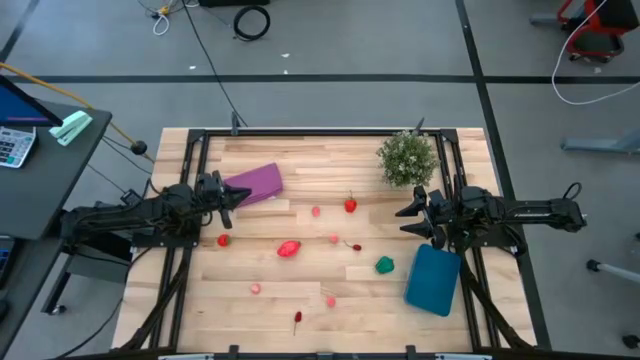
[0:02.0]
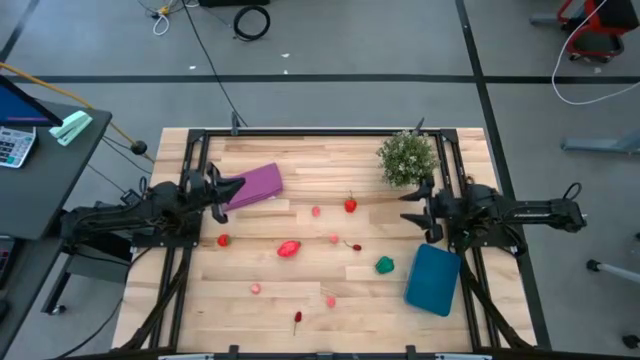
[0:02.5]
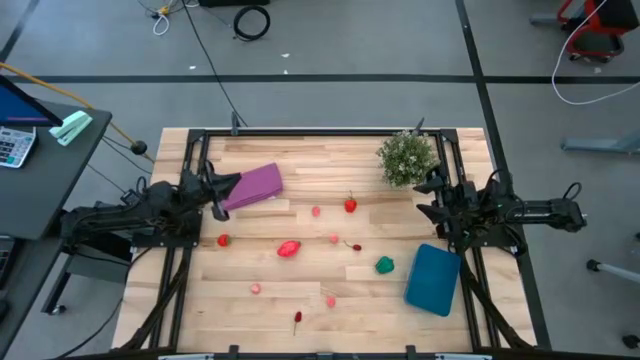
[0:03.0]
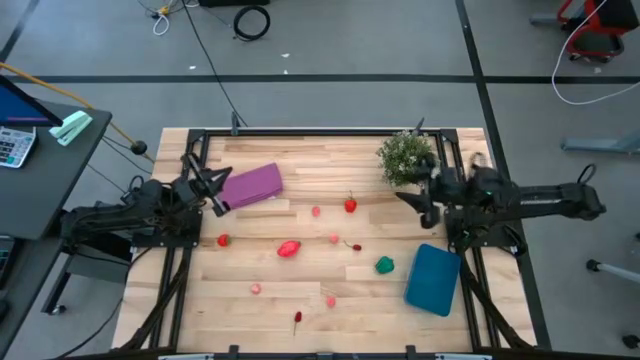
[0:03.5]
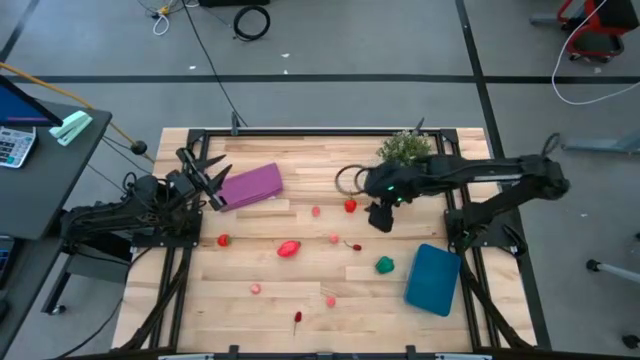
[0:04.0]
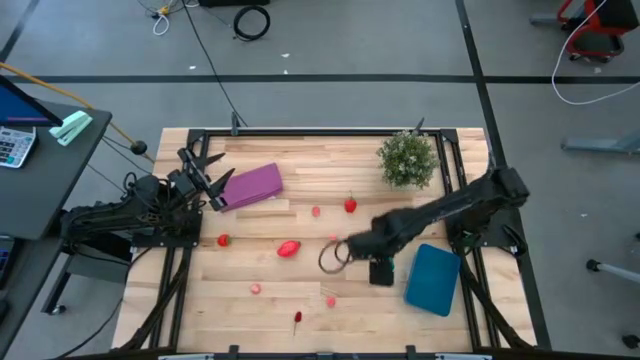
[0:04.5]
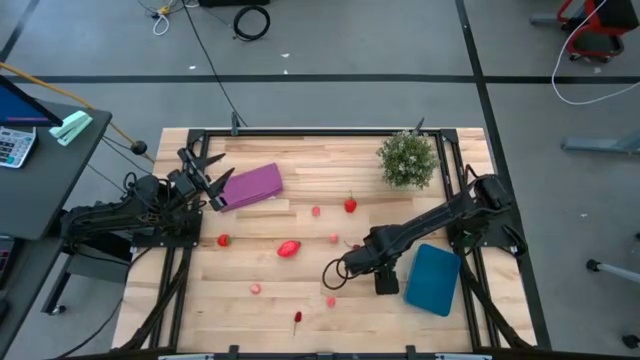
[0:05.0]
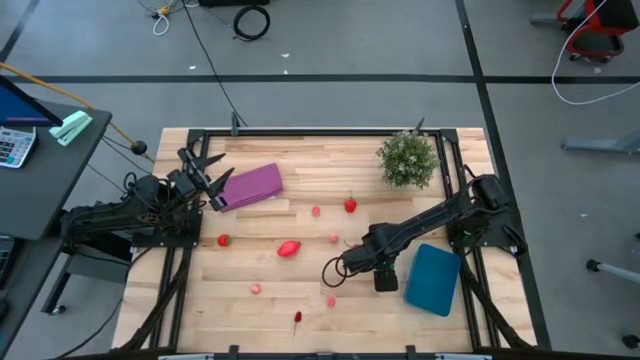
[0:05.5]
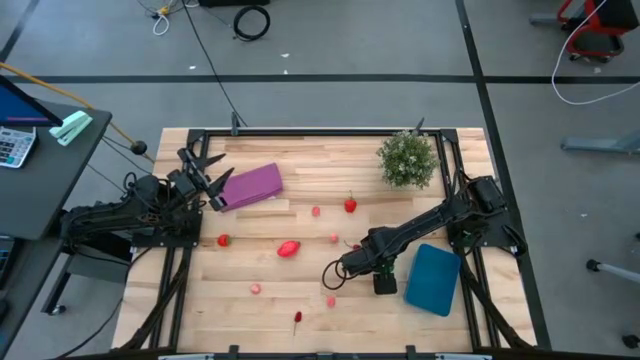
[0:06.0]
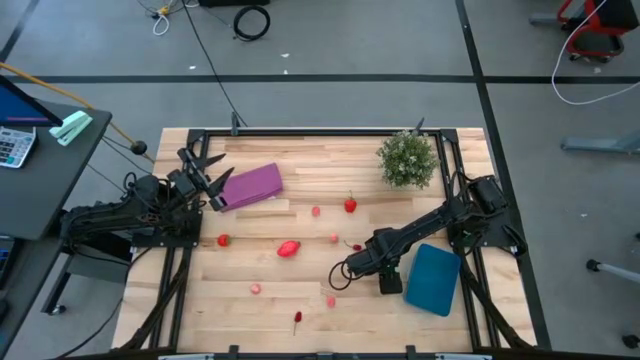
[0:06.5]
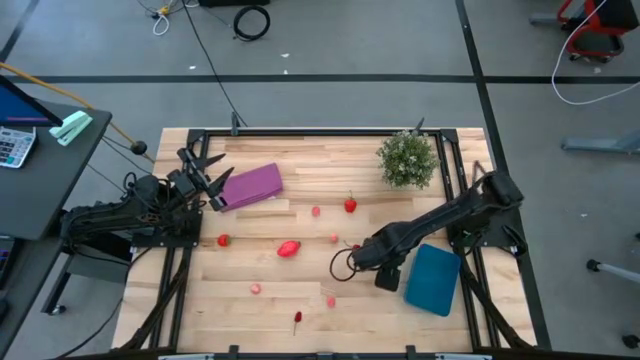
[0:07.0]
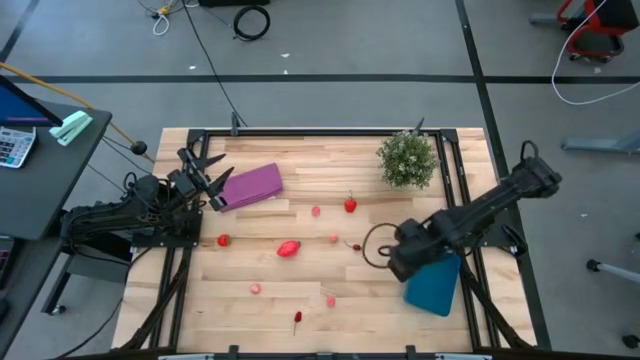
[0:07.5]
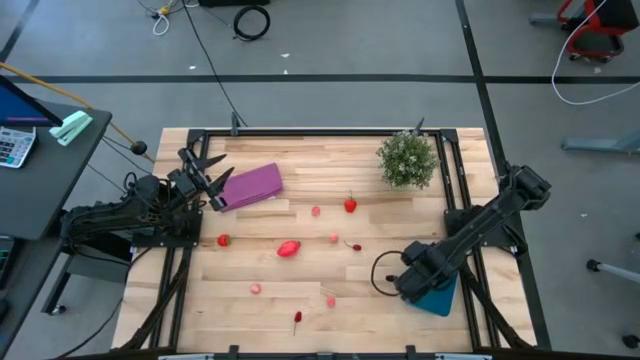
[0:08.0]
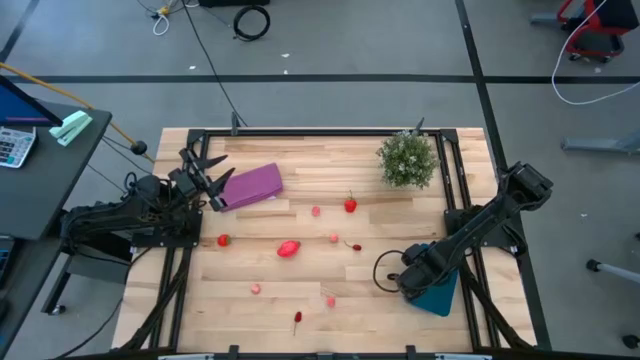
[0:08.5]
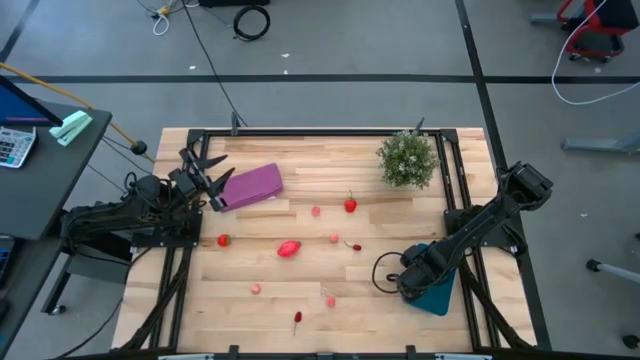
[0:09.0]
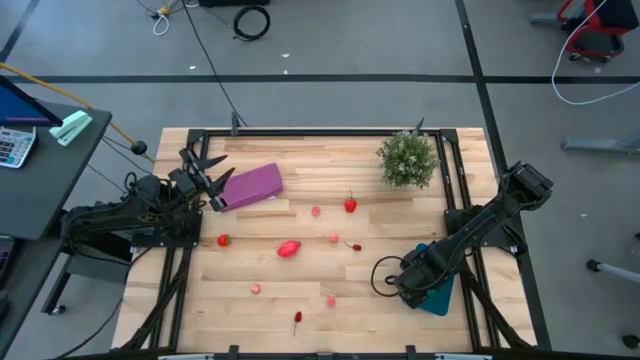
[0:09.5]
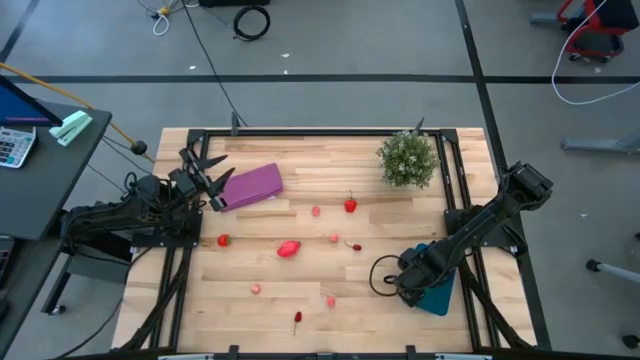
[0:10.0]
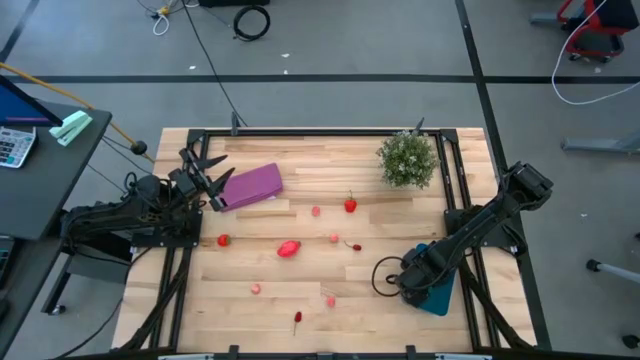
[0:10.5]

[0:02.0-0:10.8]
Task: Pick and placing Produce into tupperware
Put the green bell pepper into the blue bin

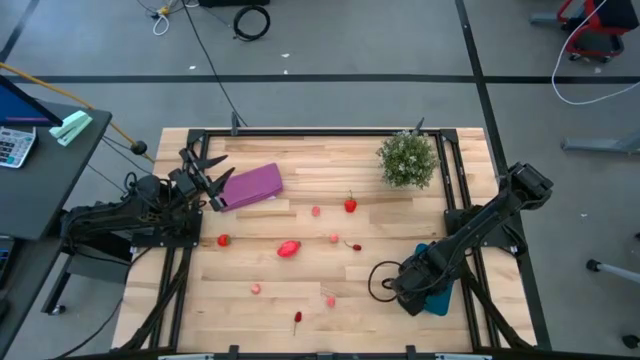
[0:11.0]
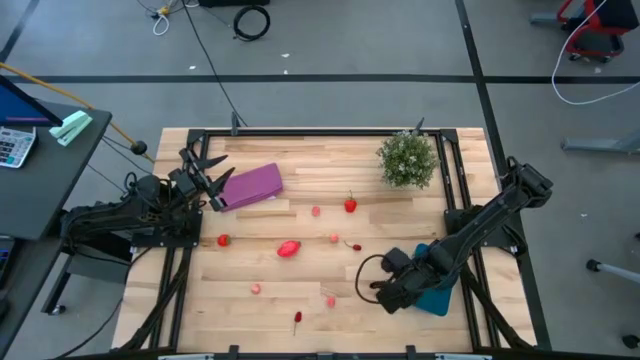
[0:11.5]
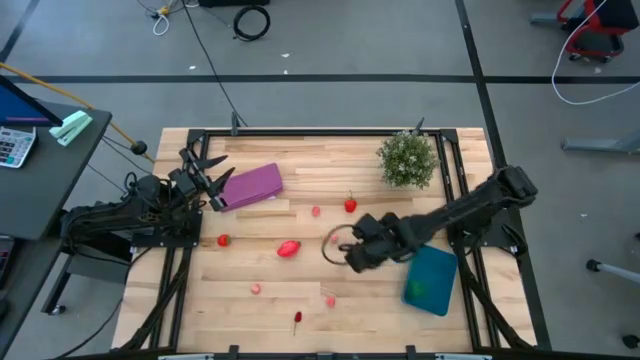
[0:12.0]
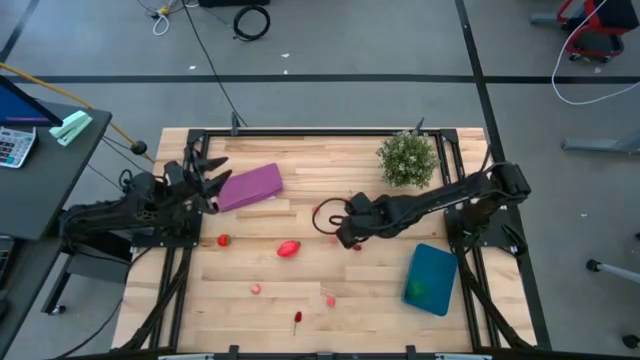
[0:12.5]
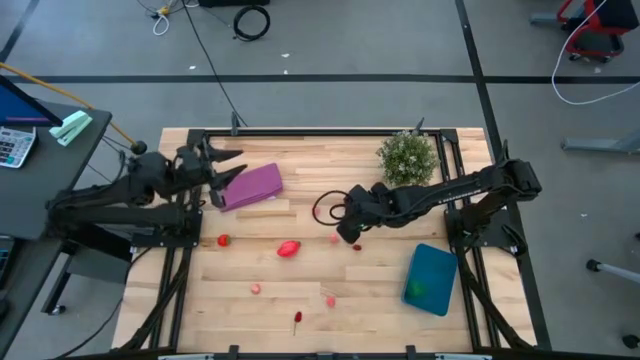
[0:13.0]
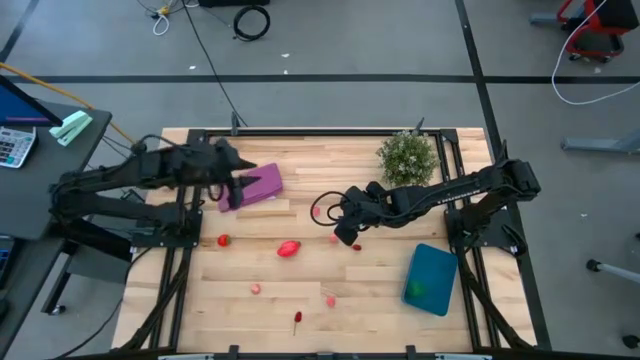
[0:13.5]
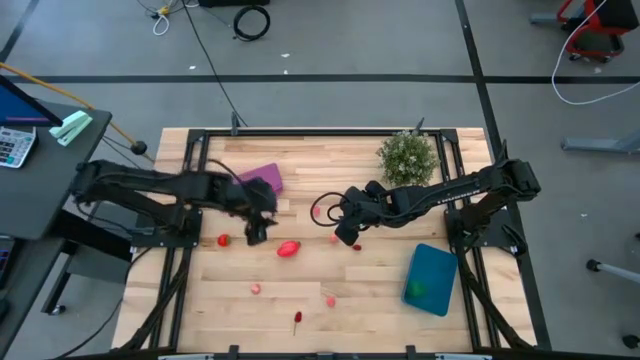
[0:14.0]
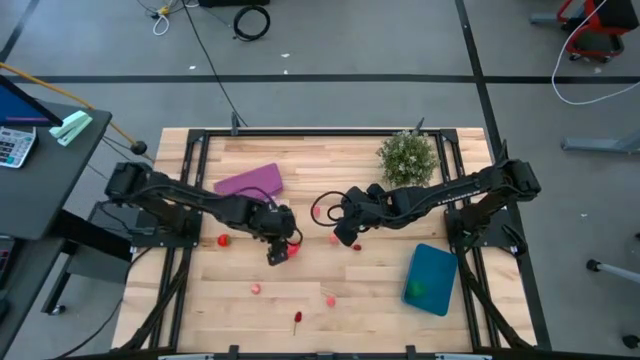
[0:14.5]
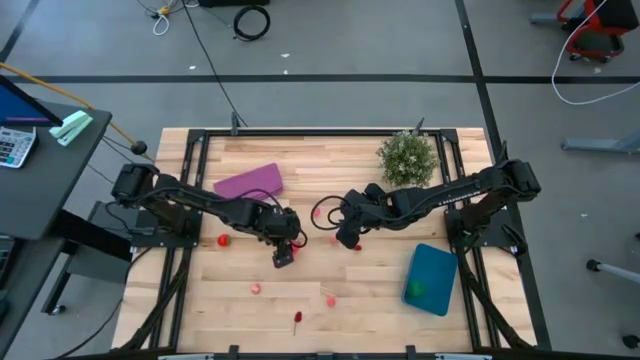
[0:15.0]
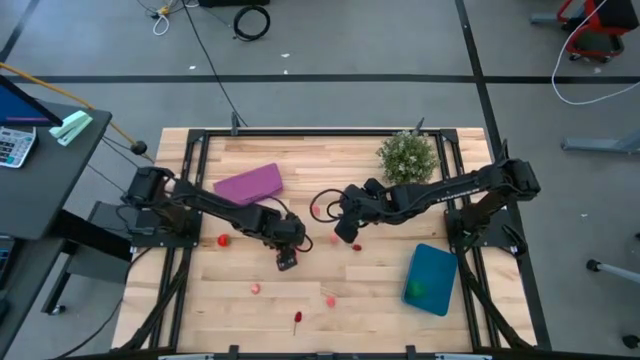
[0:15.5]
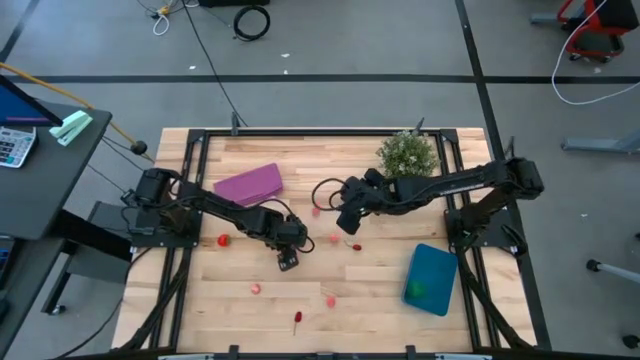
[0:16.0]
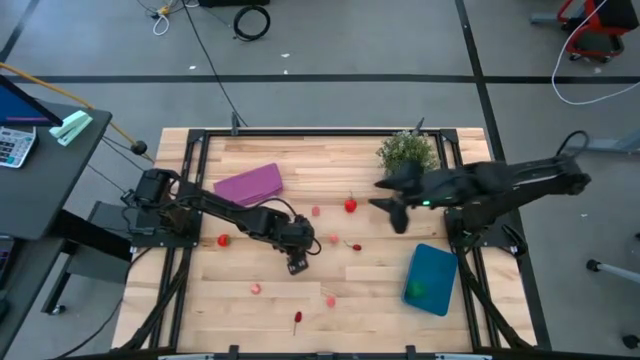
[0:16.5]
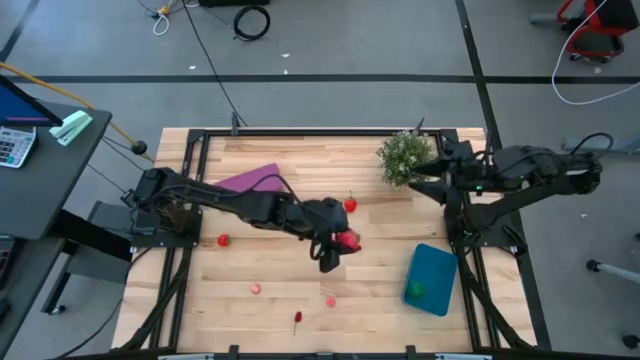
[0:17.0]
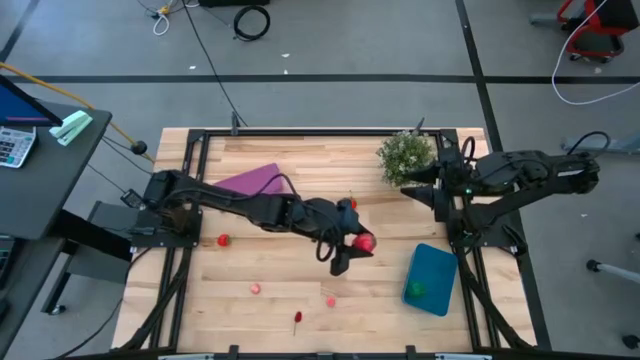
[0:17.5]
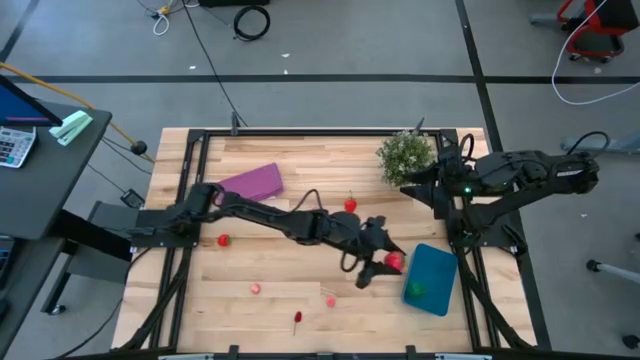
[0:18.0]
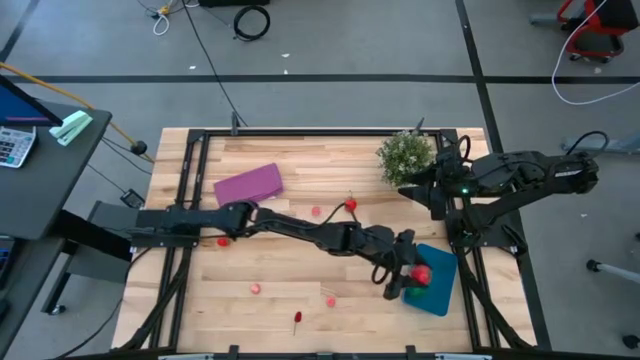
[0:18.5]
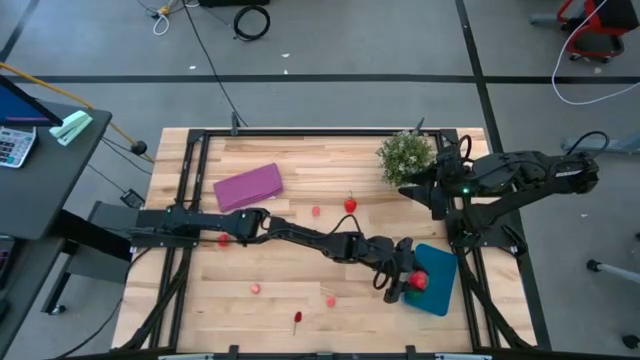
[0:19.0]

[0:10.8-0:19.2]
Put the red dragon fruit into the blue bin

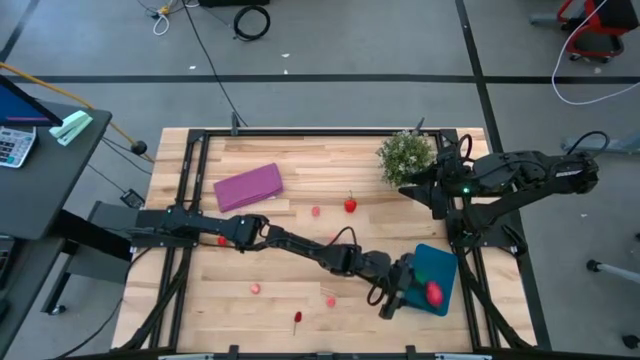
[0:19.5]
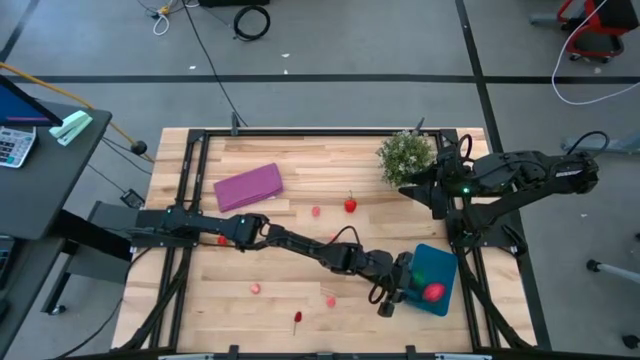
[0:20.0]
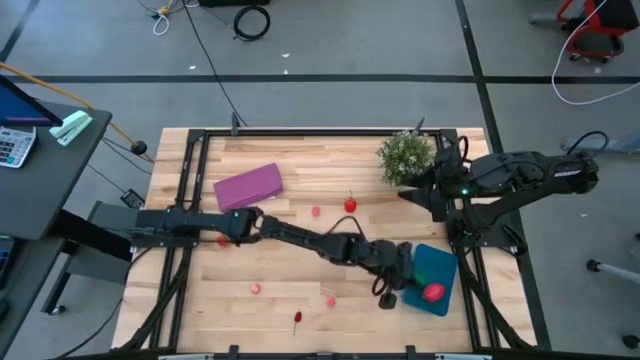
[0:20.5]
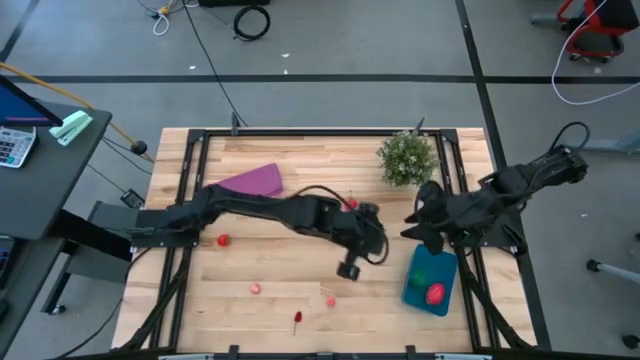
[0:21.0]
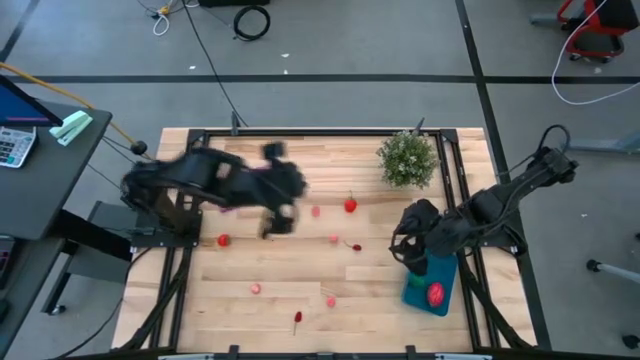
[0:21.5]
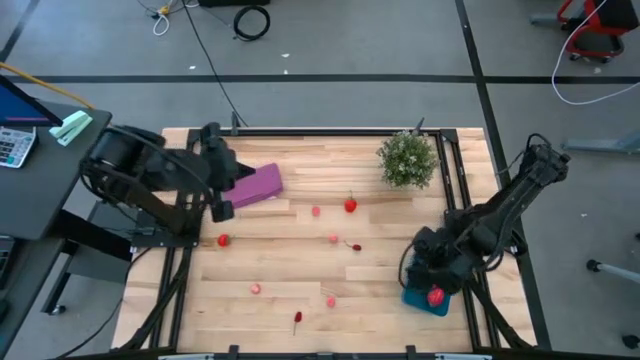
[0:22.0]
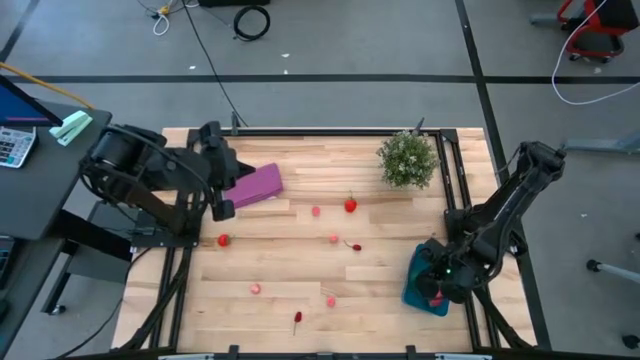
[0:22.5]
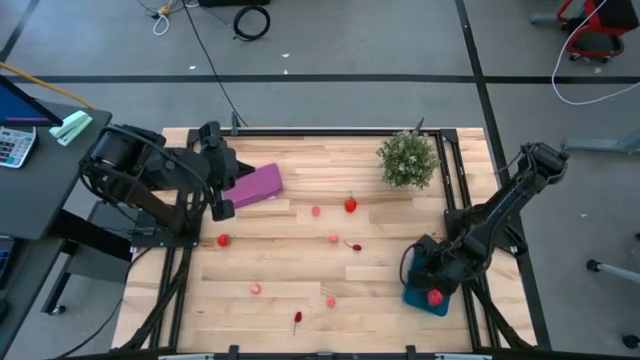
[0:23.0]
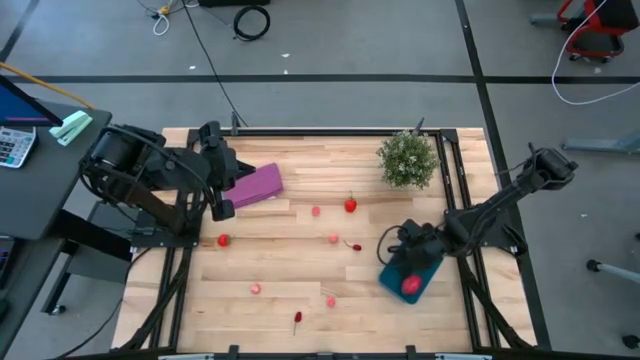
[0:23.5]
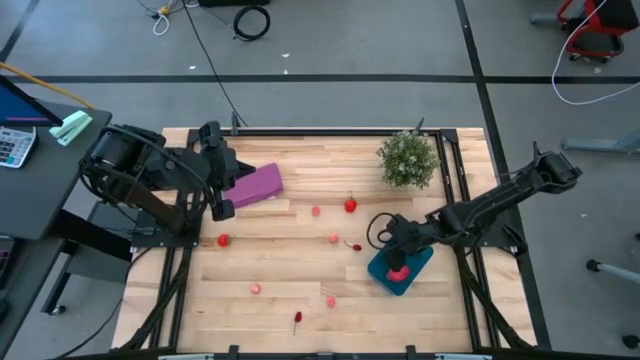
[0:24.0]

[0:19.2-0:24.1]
Adjust the blue bin
